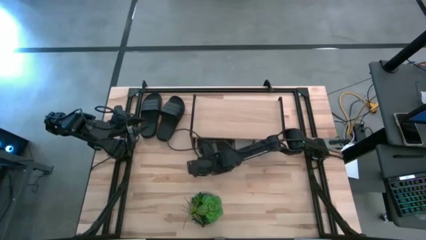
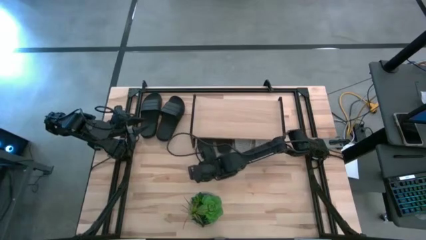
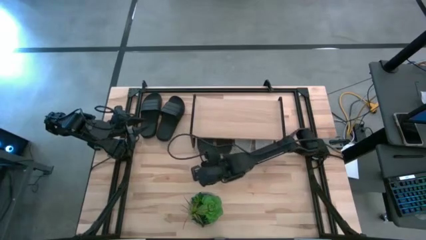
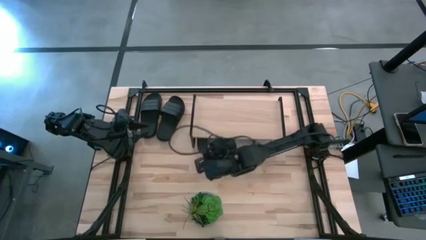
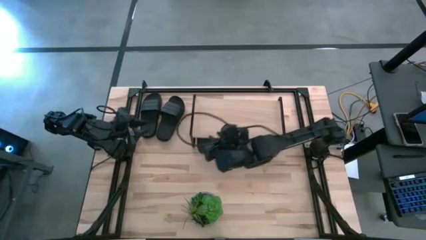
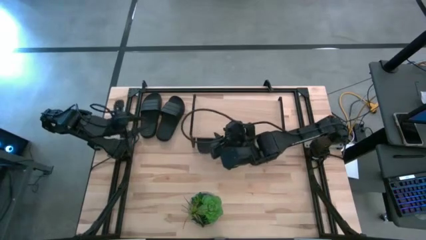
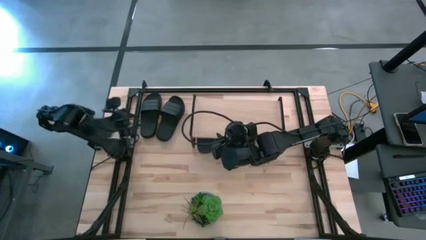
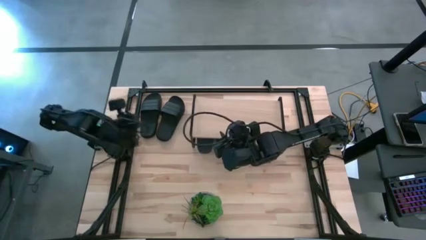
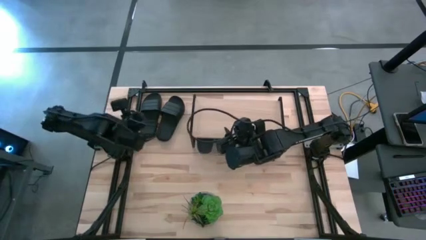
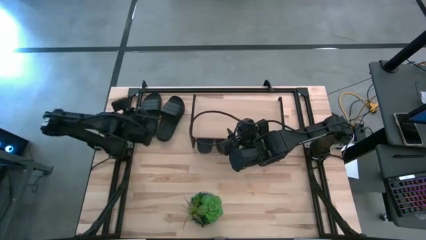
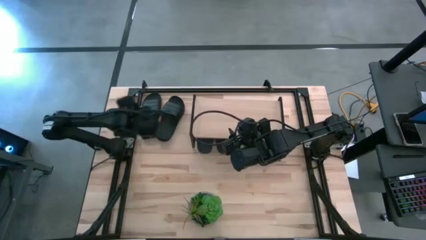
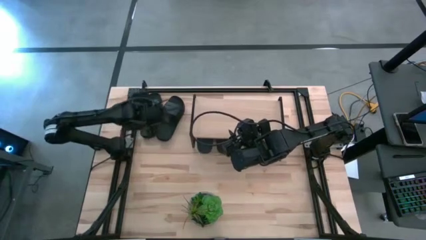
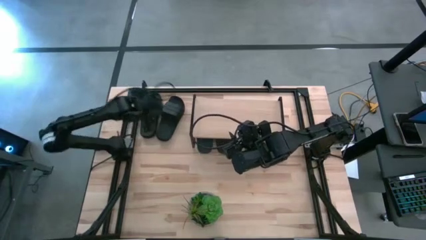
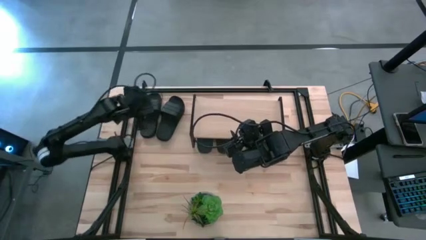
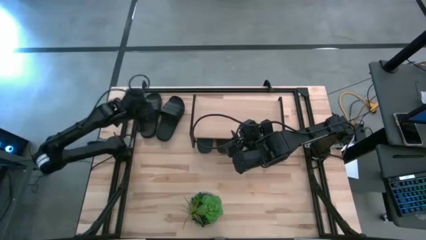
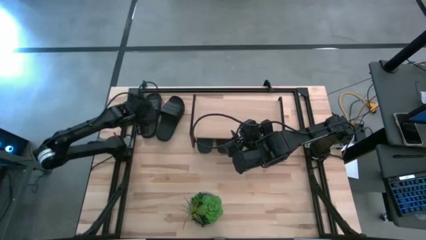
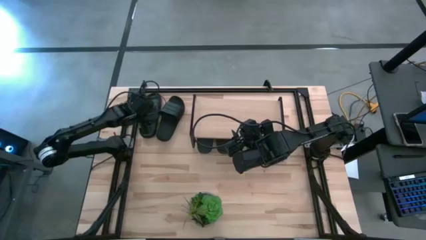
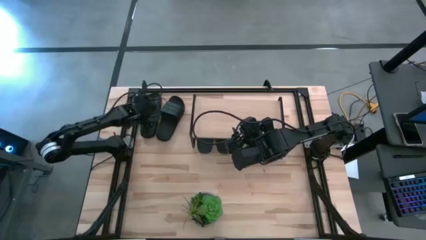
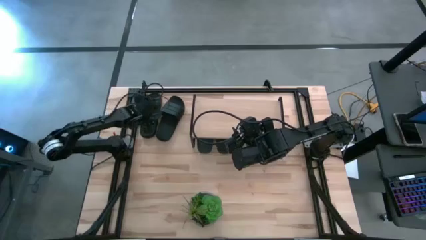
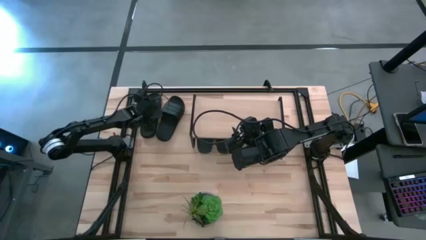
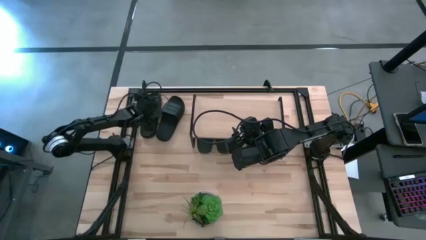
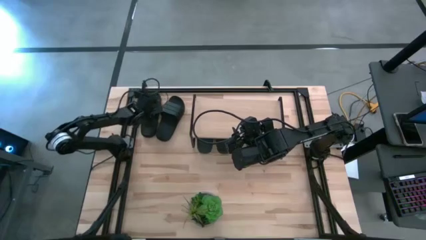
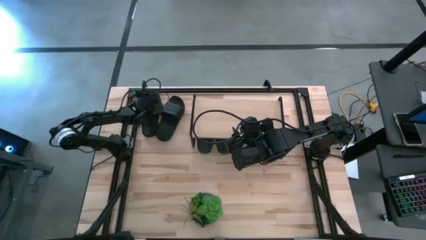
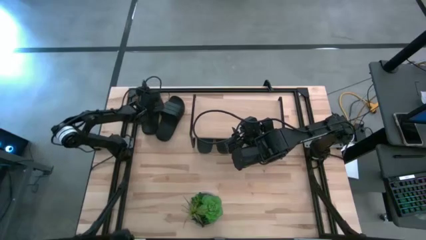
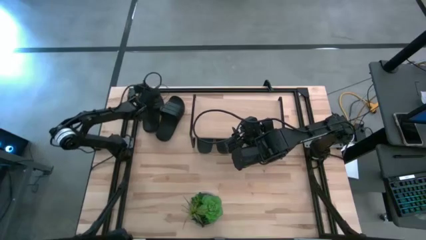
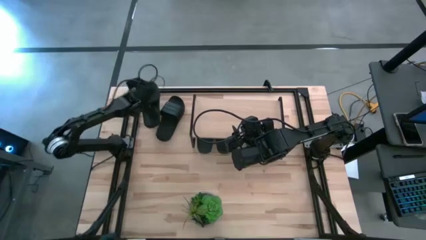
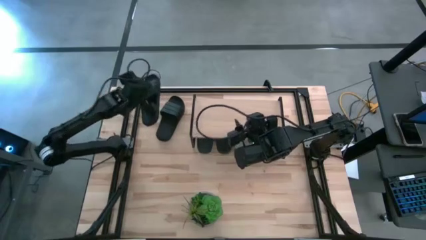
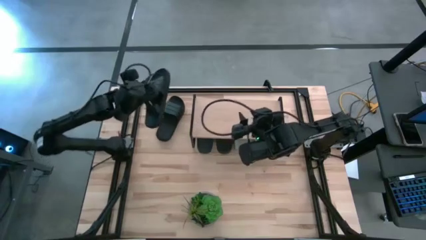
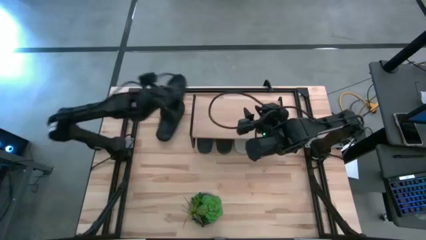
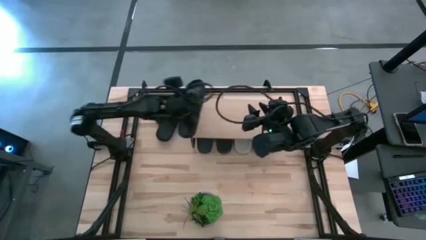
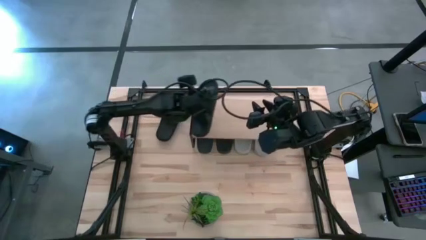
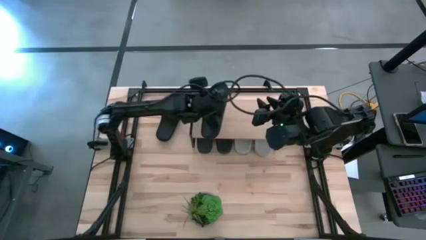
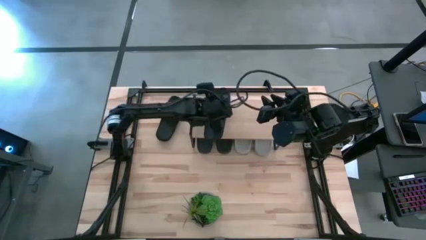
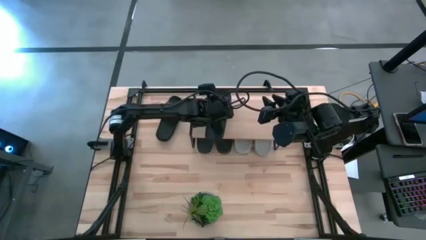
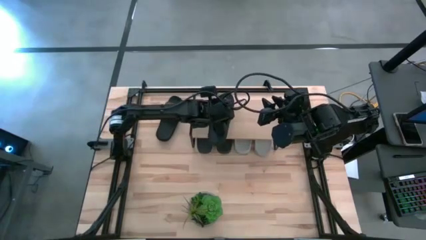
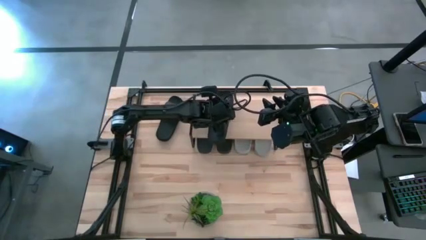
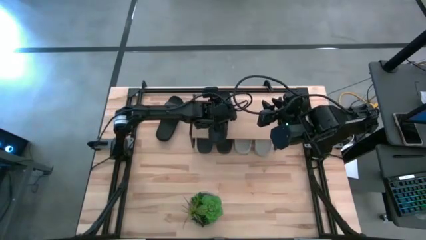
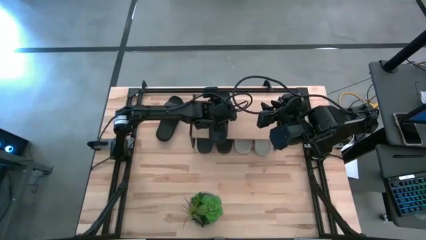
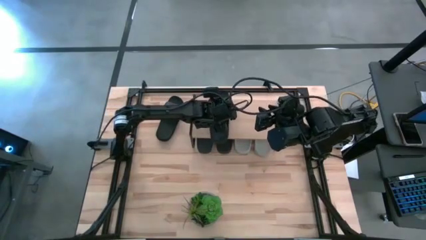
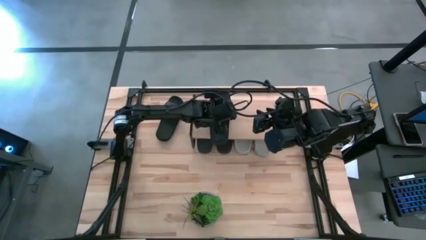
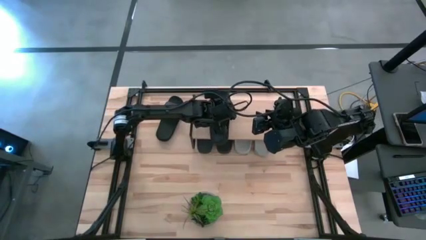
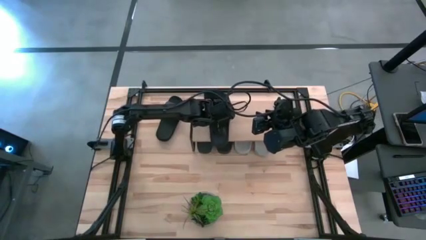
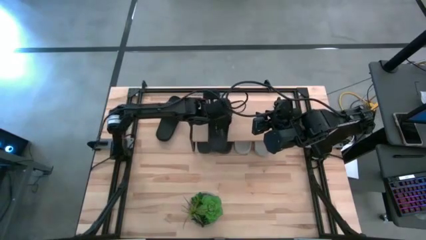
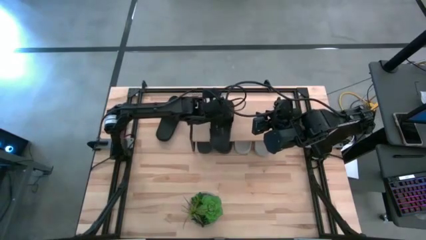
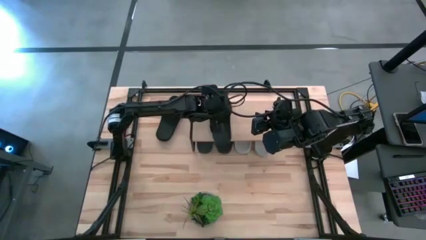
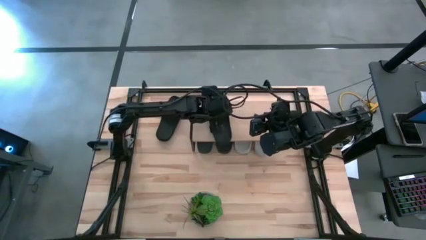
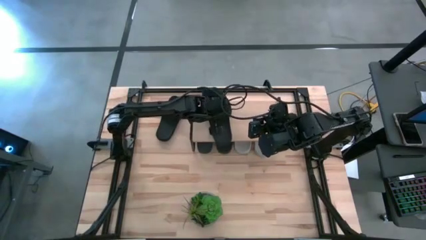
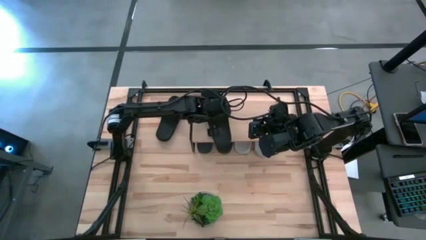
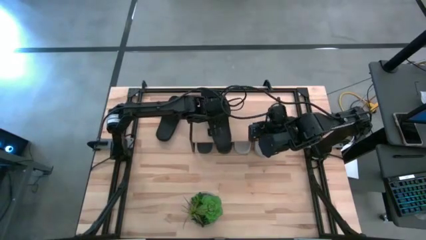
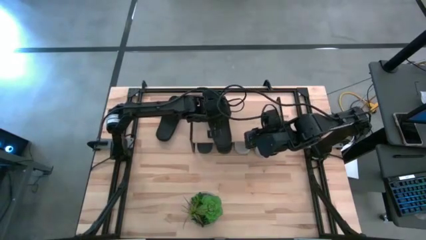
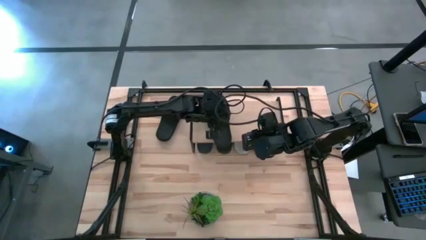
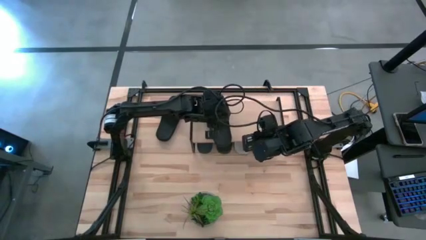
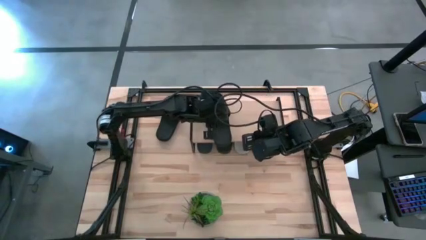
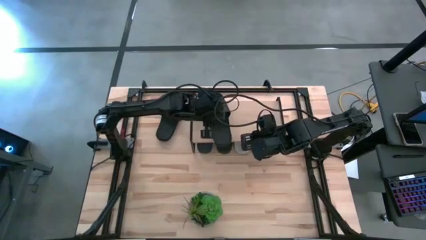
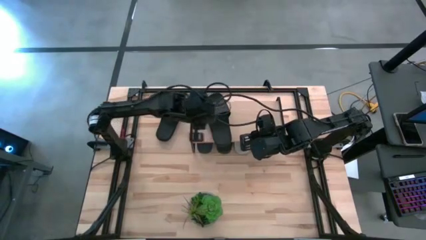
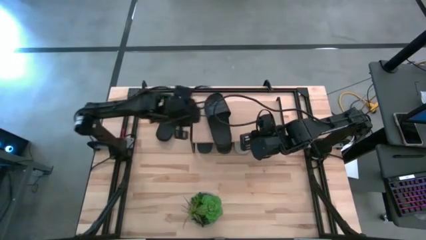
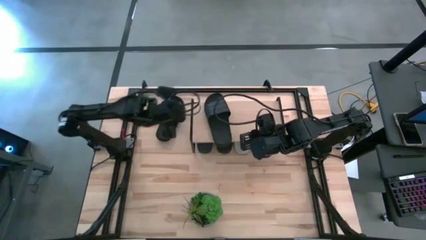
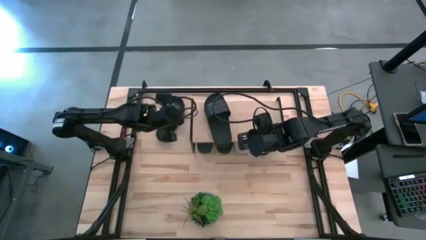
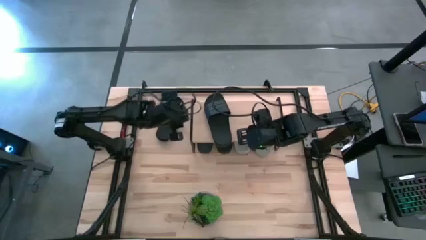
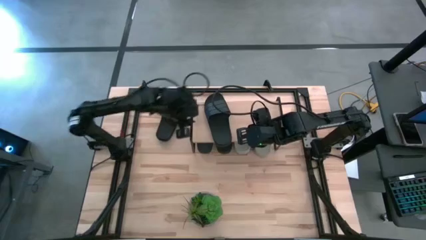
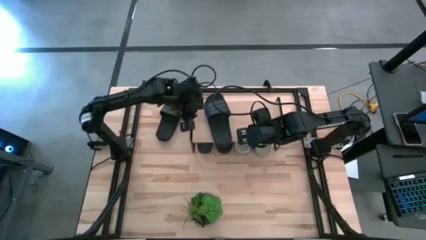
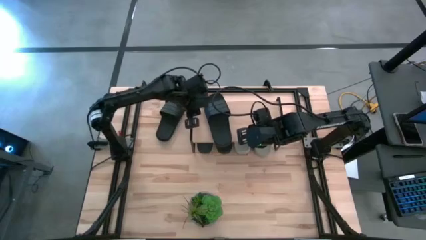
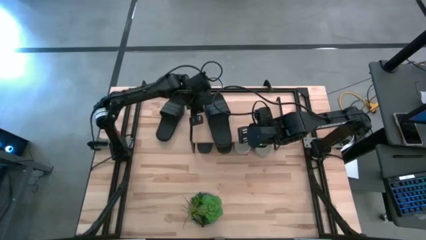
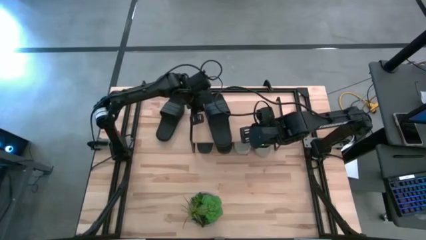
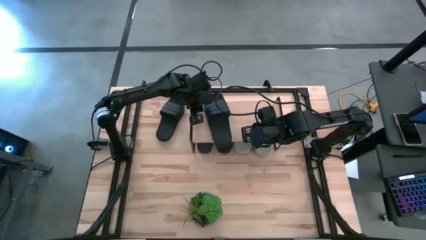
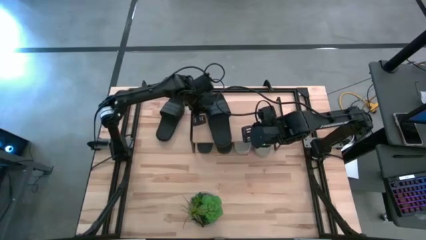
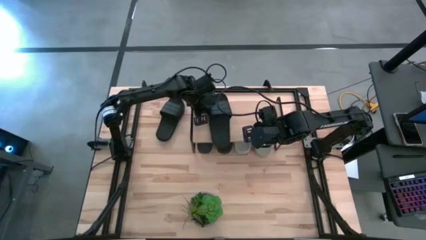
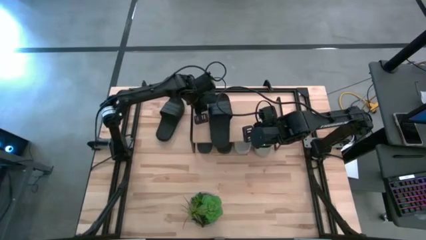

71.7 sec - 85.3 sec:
Task: Pick and place slides into the shelf
Put the black slide on the shelf
